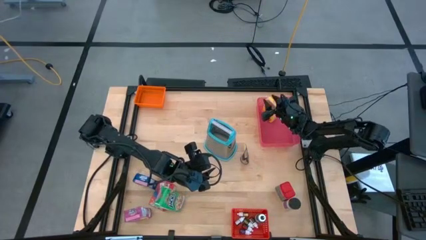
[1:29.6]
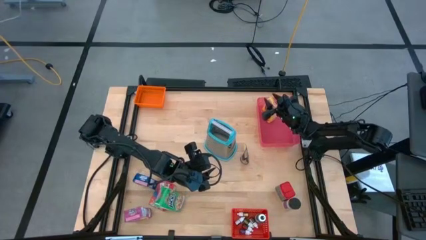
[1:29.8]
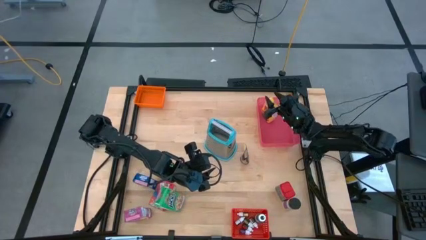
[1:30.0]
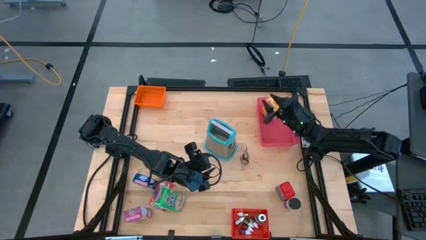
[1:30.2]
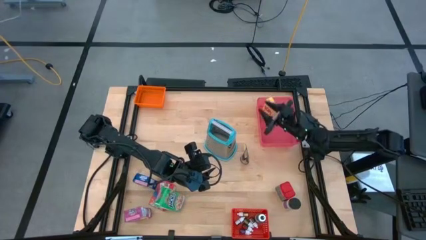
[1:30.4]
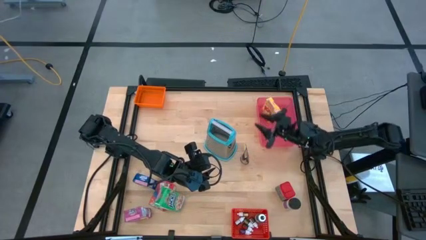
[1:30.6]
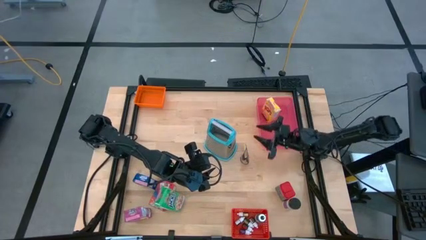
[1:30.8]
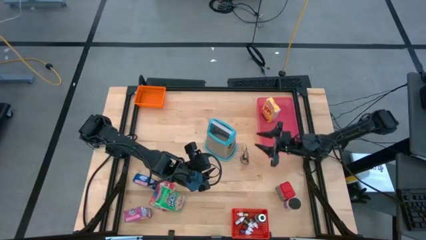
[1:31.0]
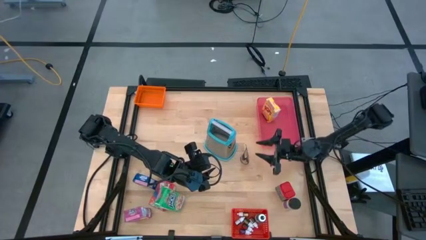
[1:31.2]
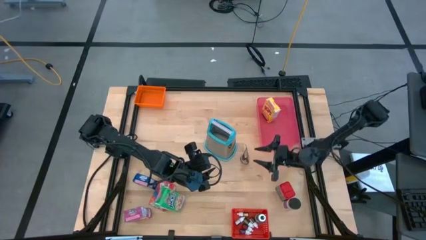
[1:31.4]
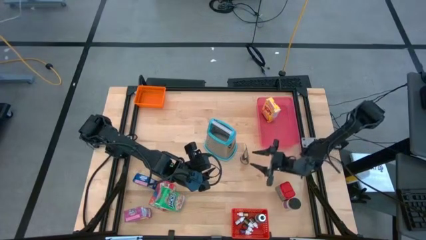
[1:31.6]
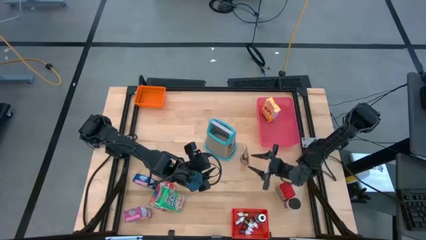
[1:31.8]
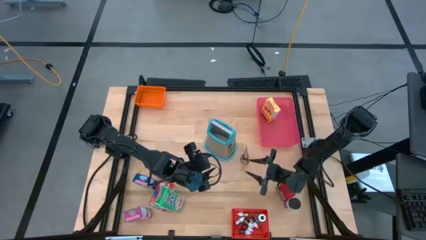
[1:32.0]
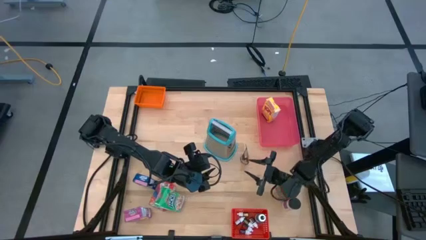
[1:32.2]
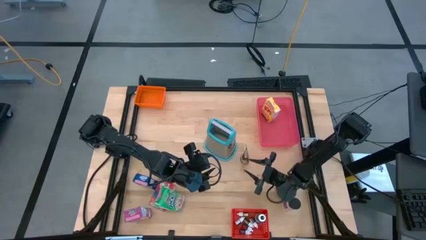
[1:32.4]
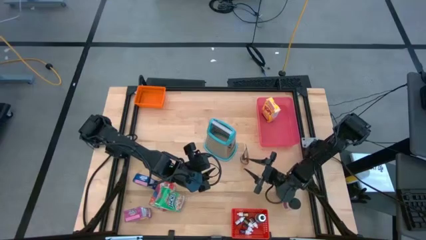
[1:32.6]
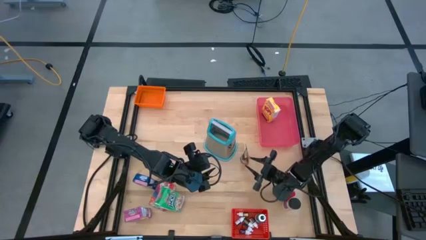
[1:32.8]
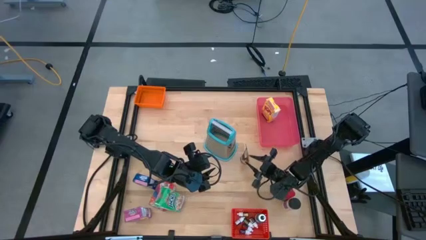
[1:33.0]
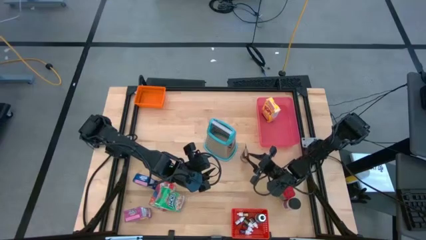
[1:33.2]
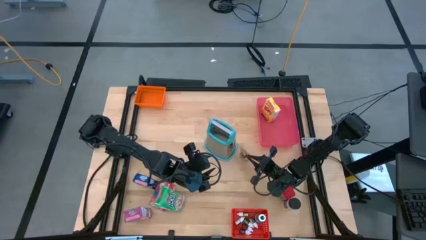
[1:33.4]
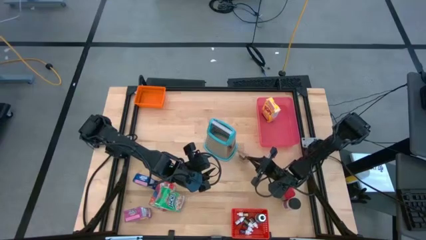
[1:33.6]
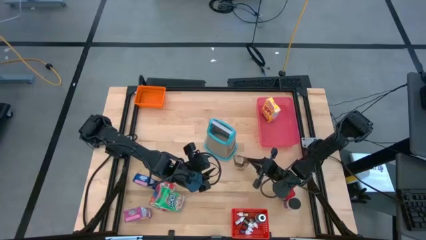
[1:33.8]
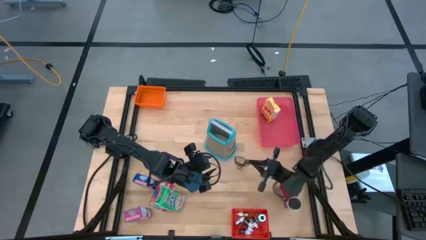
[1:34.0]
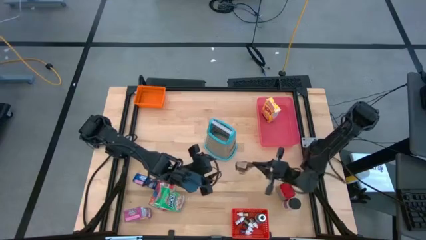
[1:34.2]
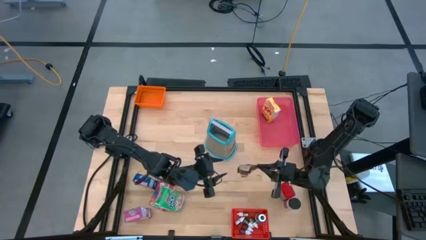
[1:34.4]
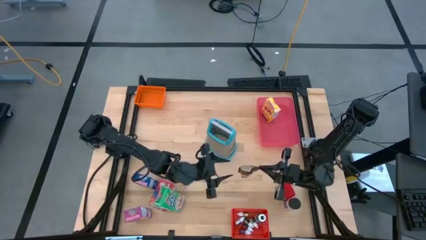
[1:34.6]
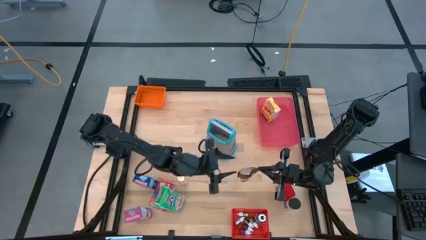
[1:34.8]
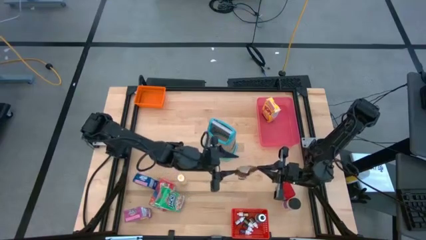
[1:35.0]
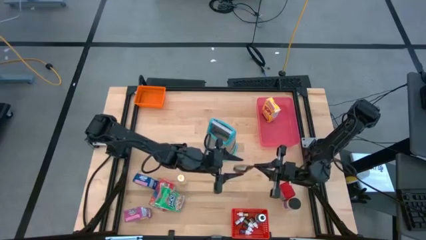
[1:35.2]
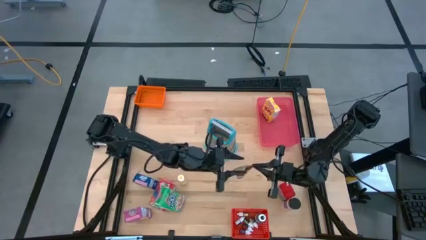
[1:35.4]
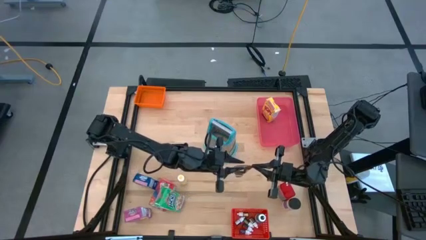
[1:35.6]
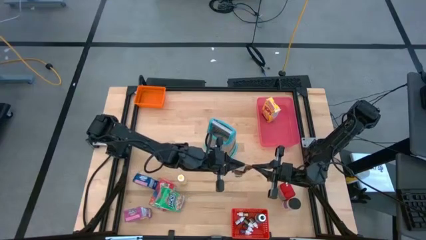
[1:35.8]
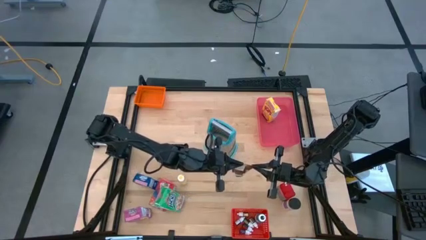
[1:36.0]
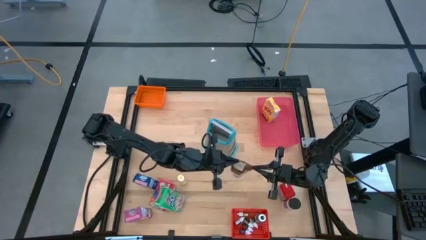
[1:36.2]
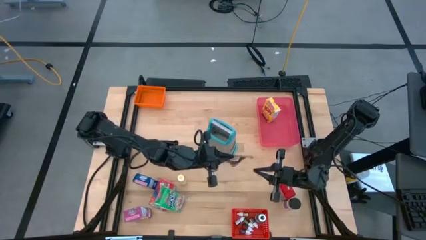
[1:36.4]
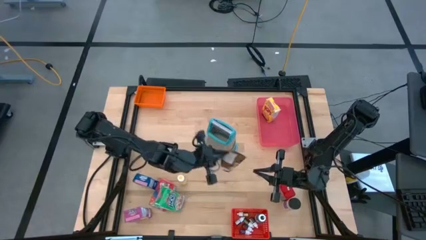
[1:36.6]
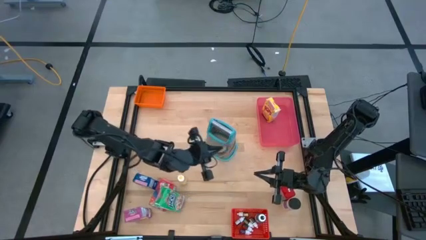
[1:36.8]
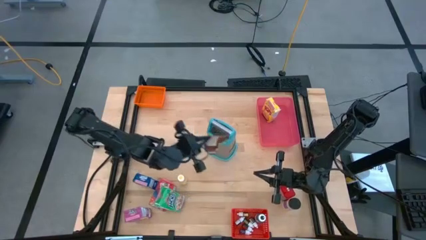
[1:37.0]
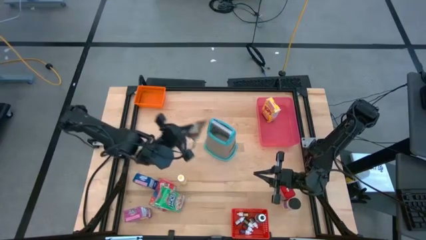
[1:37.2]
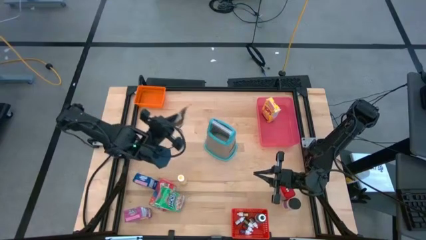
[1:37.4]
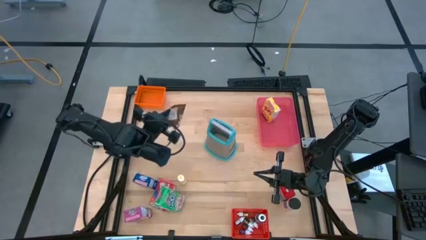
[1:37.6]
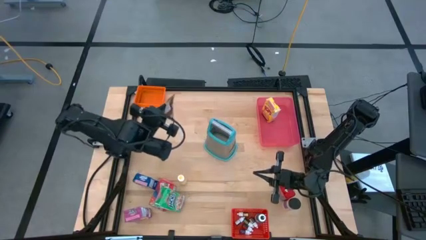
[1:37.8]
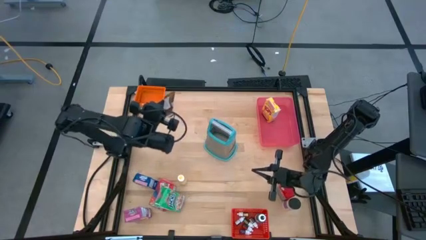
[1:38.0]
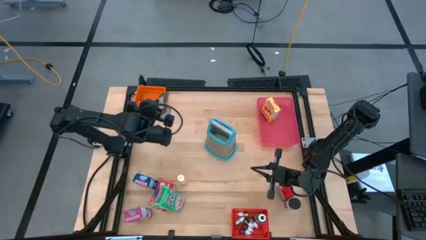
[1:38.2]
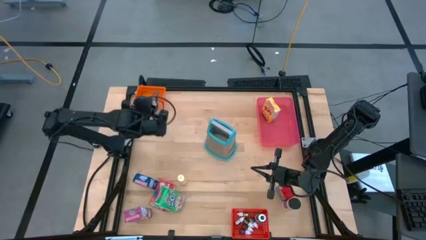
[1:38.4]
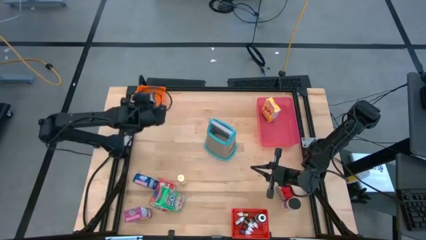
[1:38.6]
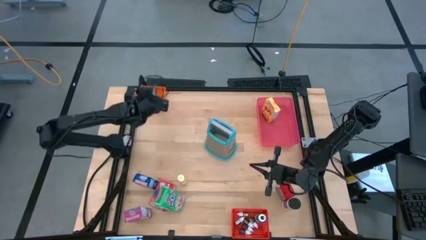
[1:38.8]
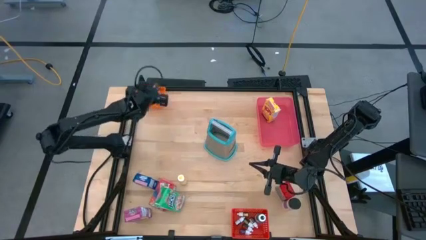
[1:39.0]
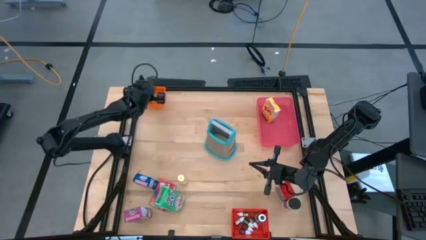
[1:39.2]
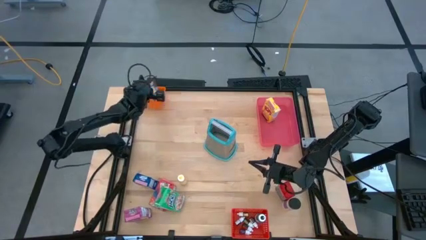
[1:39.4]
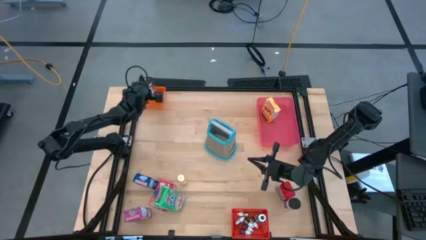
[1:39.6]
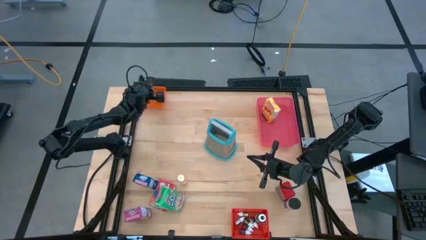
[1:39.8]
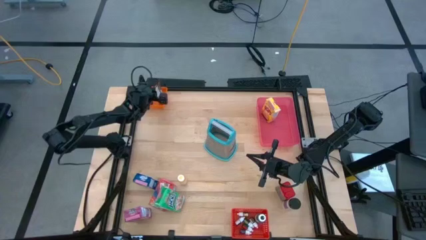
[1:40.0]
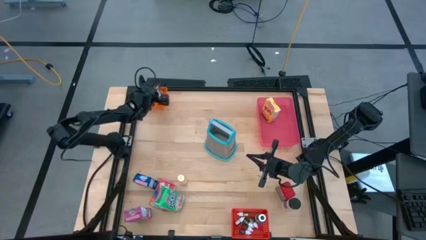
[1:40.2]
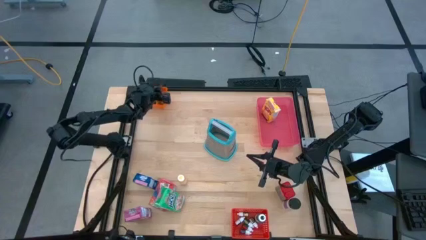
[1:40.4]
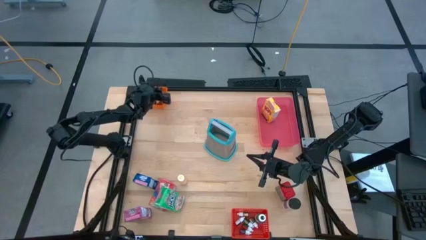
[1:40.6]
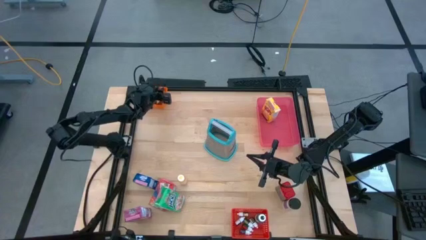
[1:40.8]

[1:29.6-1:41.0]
Task: Pick & Place Kitchen Items
Put the orange seasoning bag into the orange bin

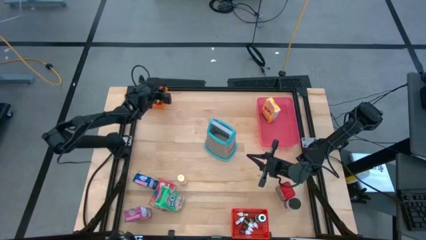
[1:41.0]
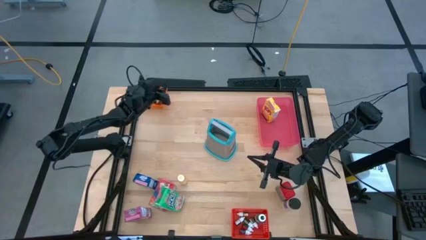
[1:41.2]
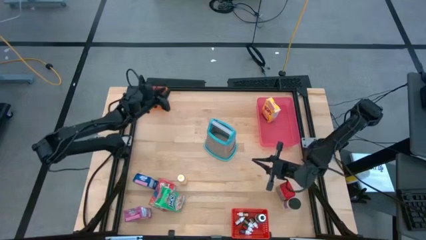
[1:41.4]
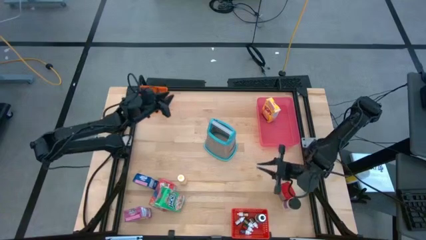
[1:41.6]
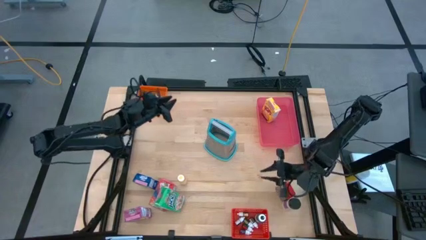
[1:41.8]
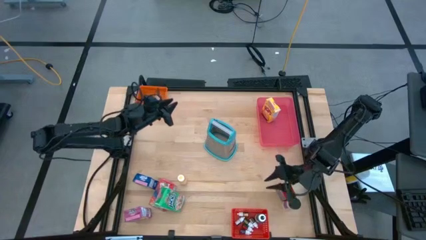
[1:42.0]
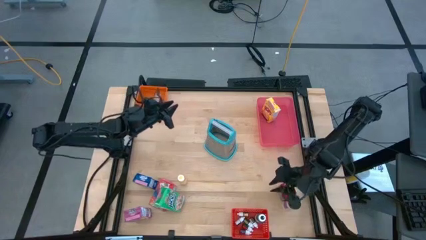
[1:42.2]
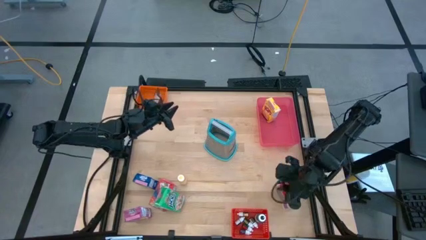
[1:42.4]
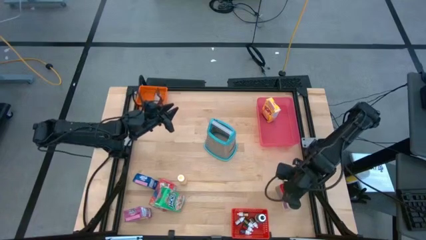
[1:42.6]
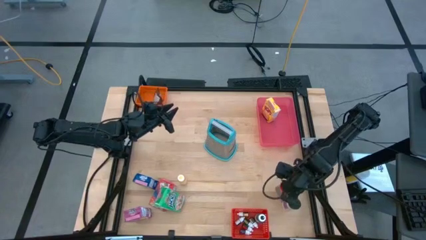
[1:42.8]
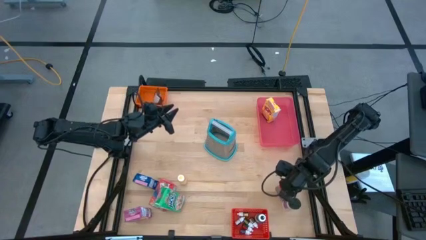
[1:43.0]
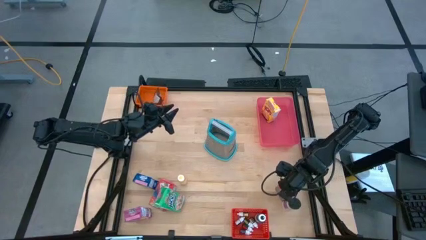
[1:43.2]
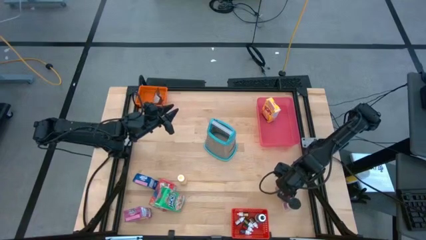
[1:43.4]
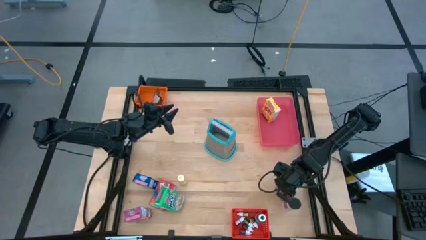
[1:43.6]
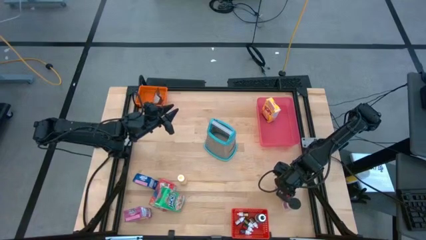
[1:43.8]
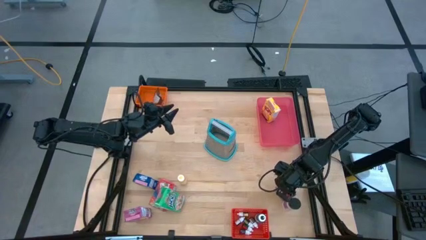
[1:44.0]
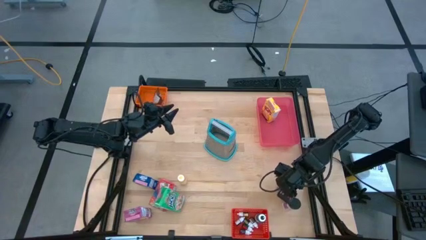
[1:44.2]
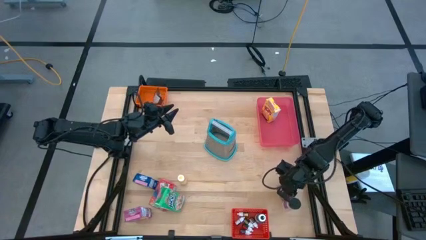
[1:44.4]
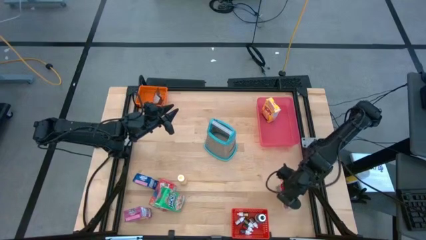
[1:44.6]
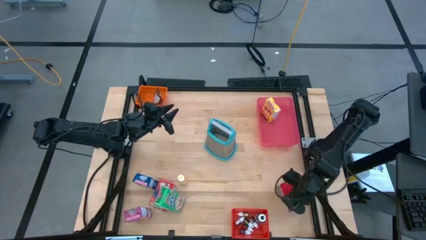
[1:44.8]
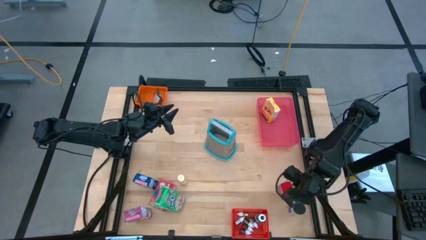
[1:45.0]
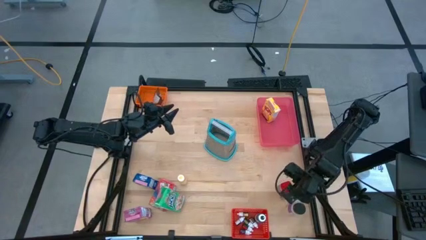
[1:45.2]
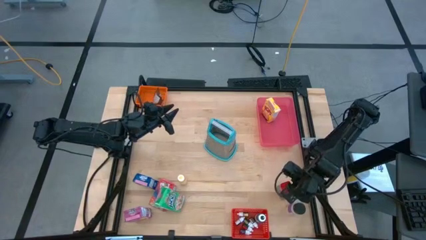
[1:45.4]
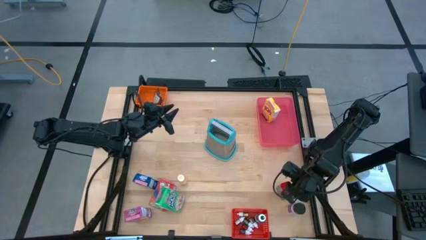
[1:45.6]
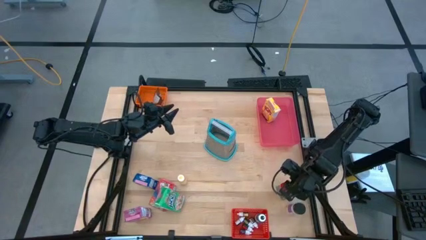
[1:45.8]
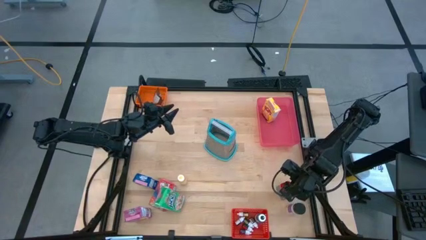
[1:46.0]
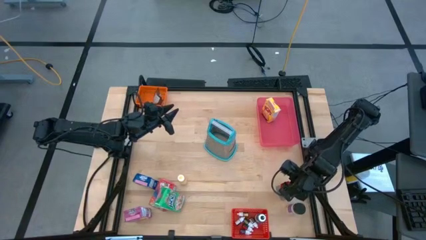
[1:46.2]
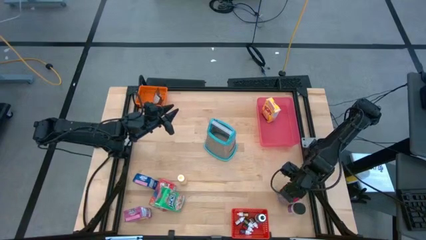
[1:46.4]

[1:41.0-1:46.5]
Put the red seasoning can into the orange bin
